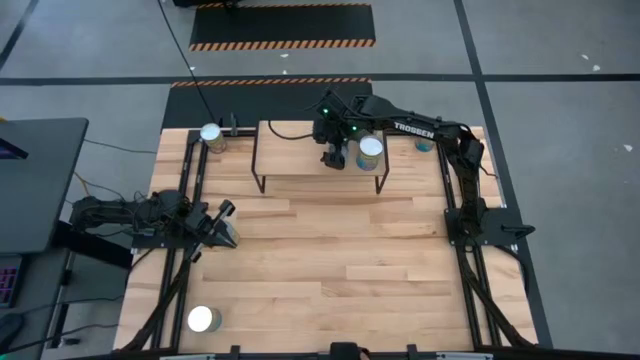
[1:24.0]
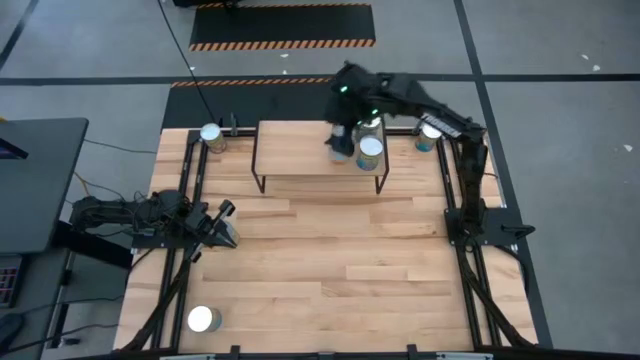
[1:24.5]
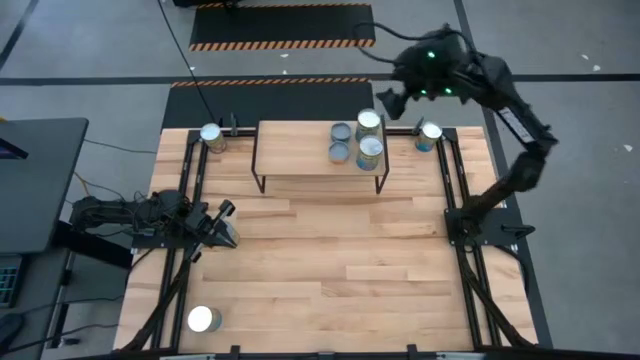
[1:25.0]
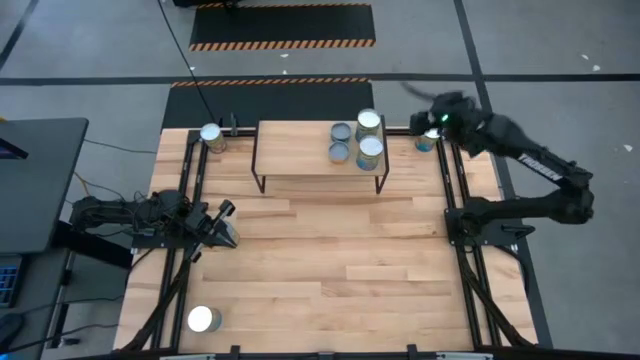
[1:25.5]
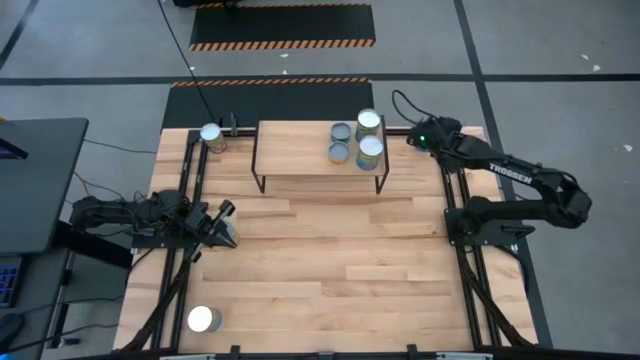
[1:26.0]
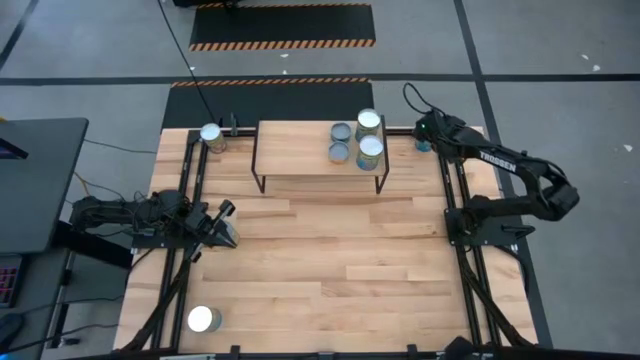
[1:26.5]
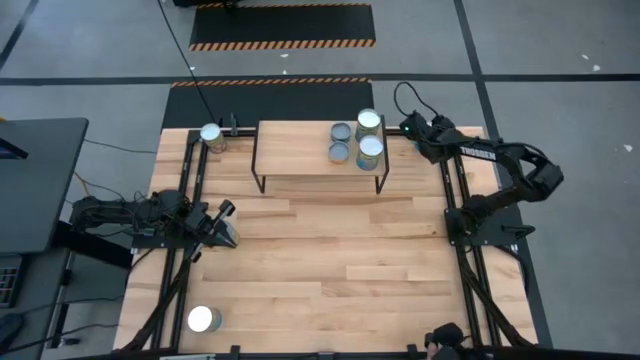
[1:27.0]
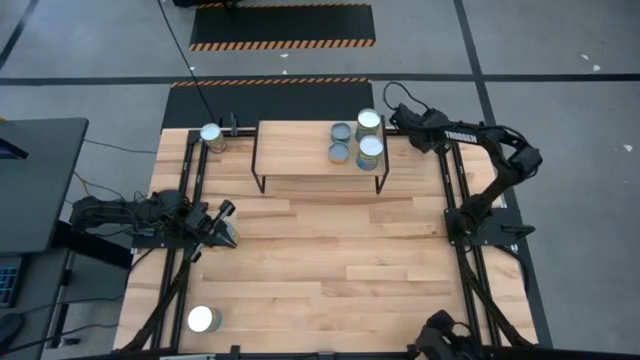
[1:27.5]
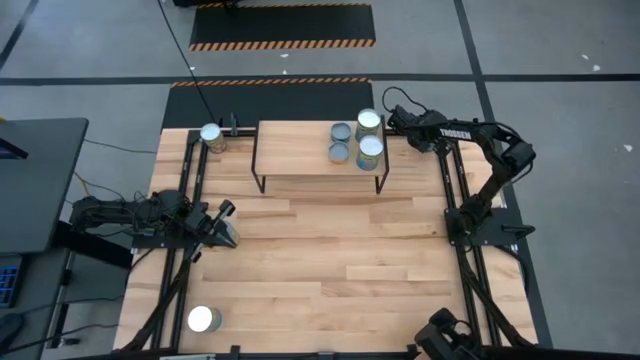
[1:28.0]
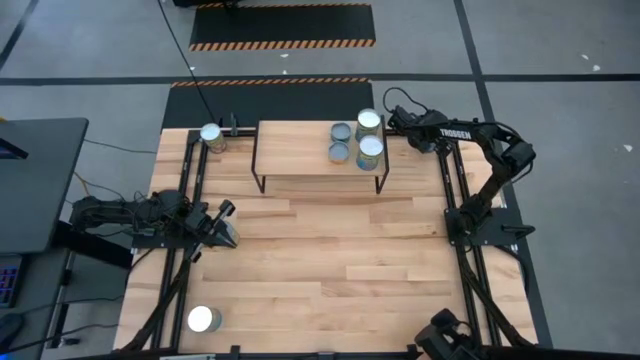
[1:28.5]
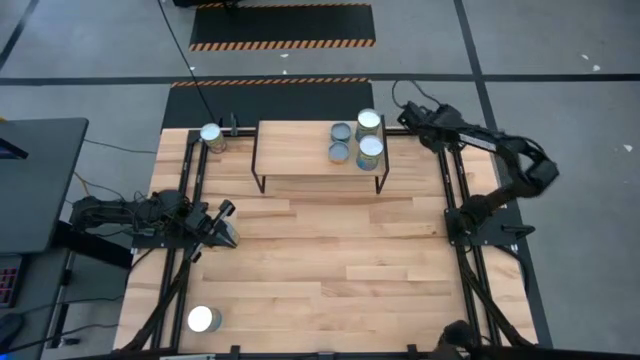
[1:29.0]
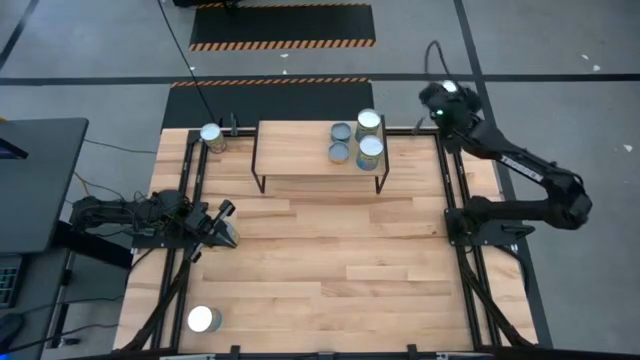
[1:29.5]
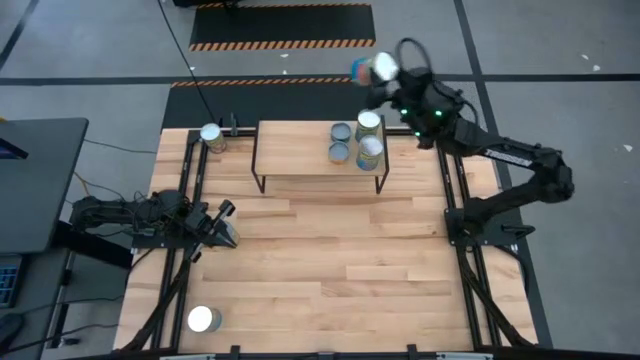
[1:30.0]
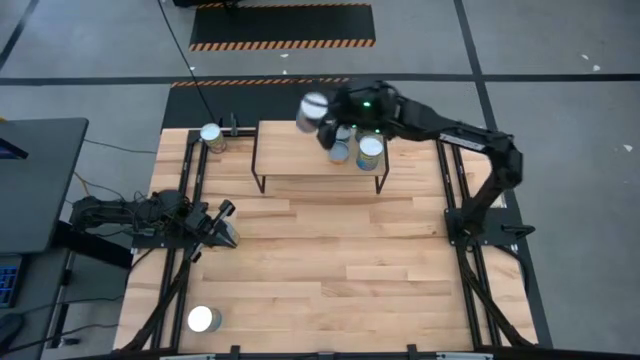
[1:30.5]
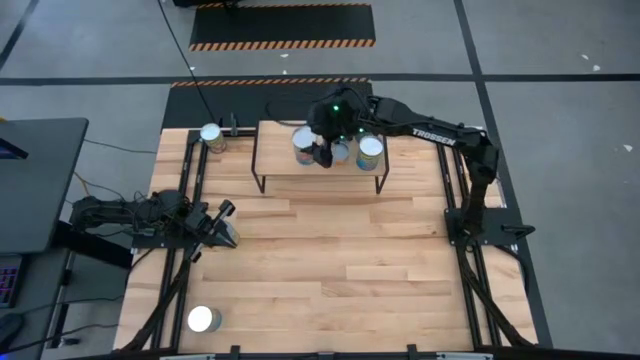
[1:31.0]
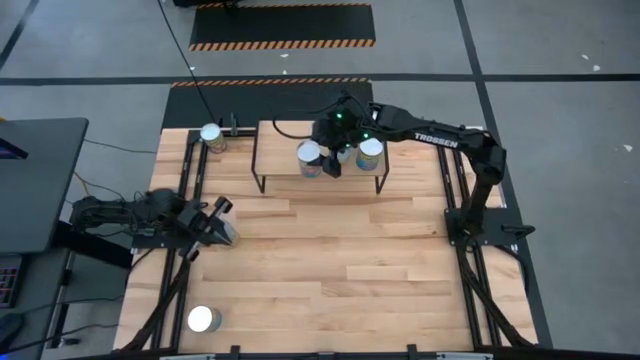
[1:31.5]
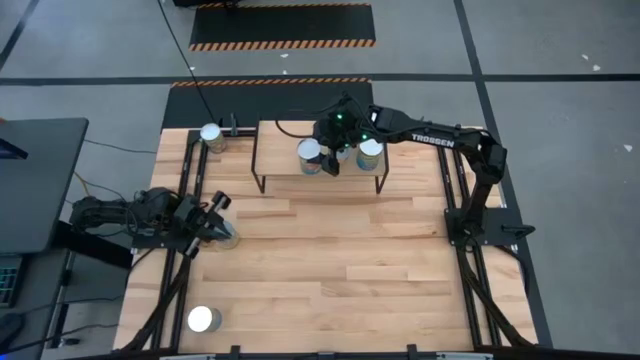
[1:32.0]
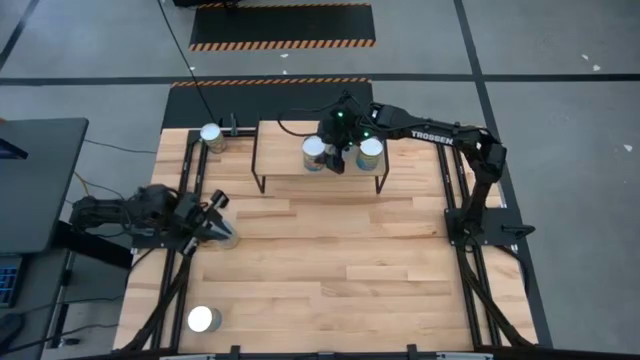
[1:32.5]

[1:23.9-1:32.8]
Task: Pick and place cans onto a shelf
Put the big blue canned tomatoes on the shelf

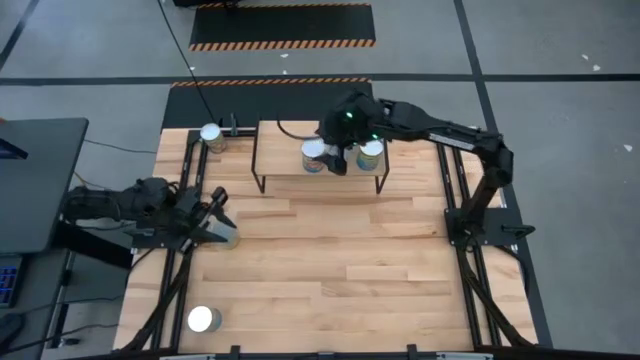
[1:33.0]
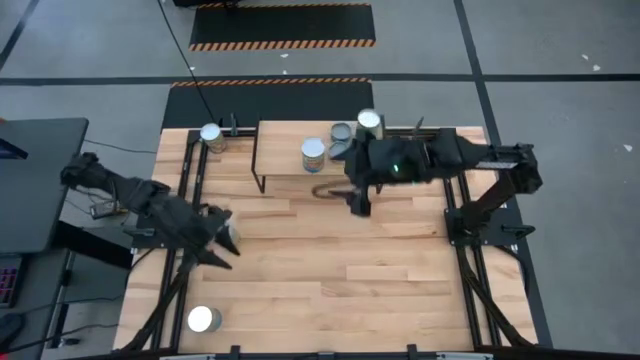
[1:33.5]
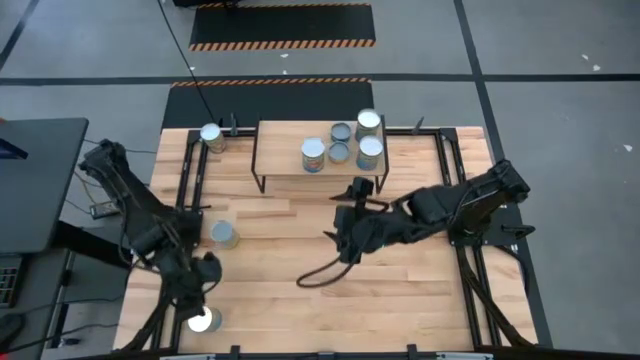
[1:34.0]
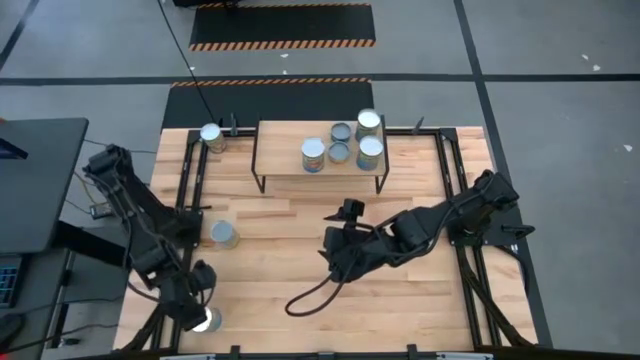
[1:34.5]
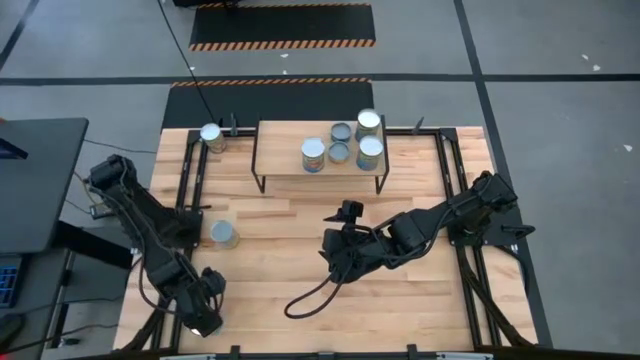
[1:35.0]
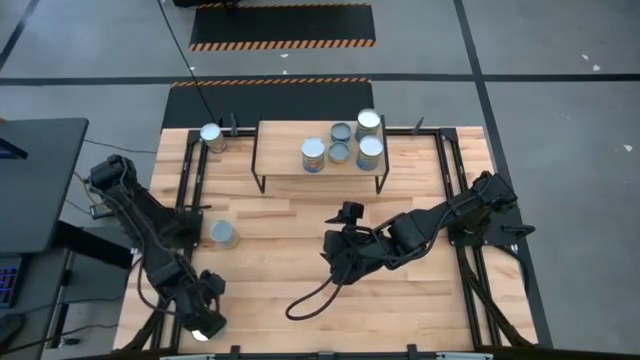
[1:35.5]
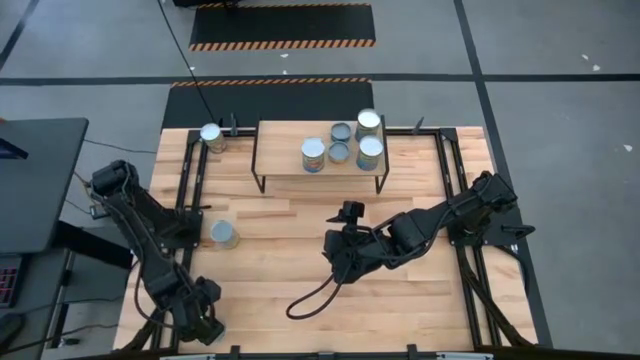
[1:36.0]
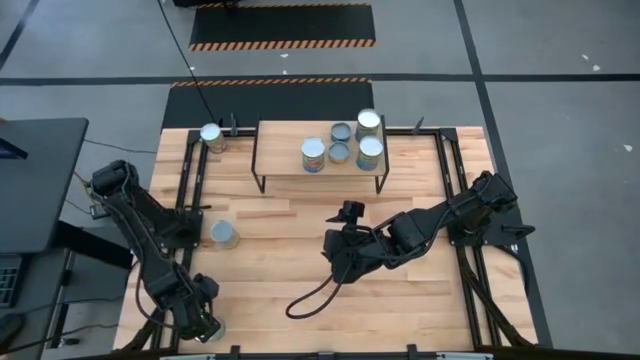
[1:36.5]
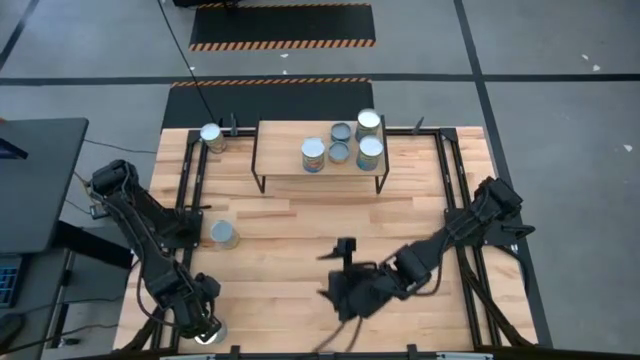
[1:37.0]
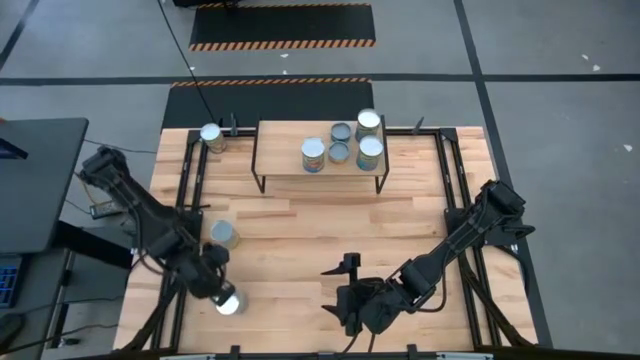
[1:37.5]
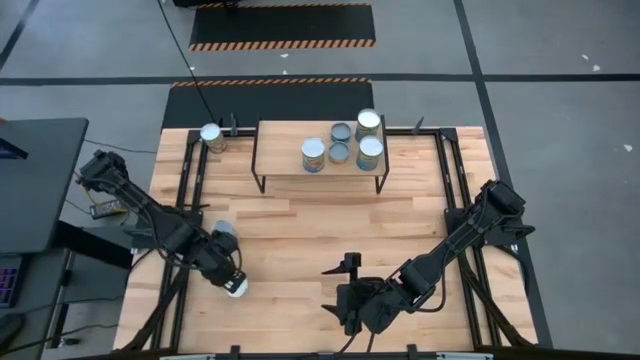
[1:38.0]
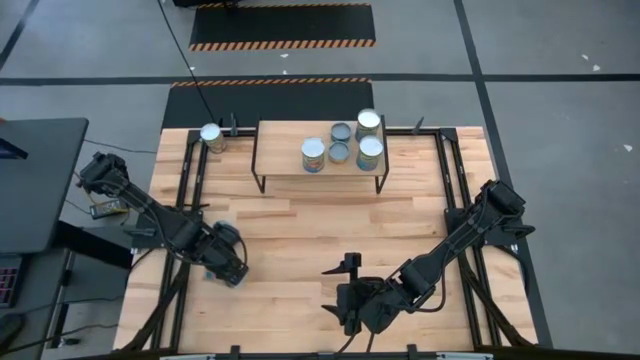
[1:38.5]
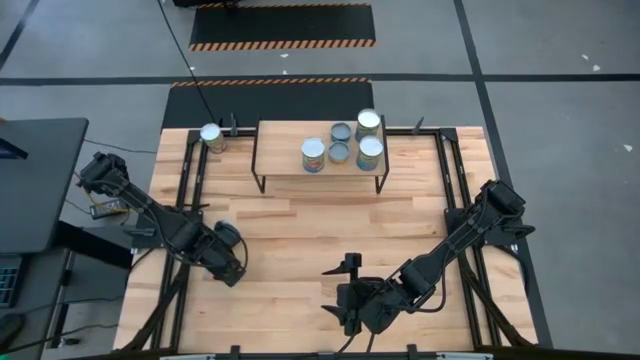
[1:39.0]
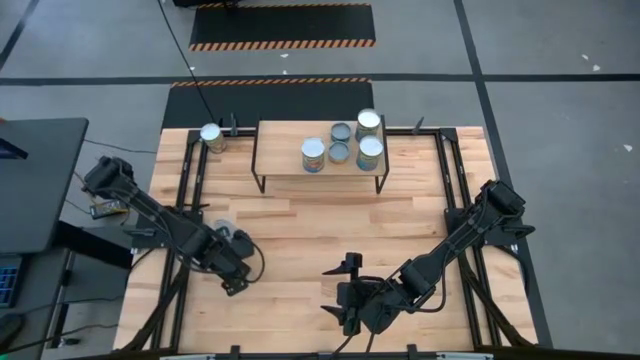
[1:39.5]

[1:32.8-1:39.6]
Put the big blue canned tomatoes on the shelf aligned with the other big blue canned tomatoes

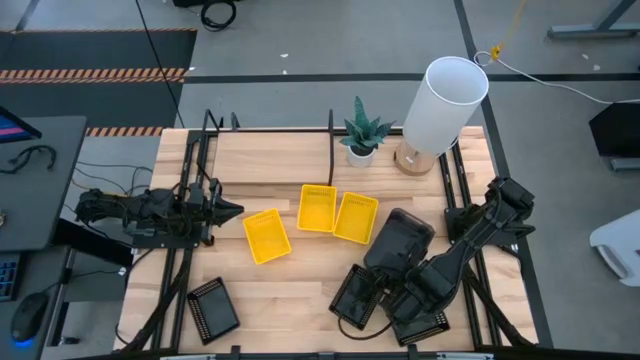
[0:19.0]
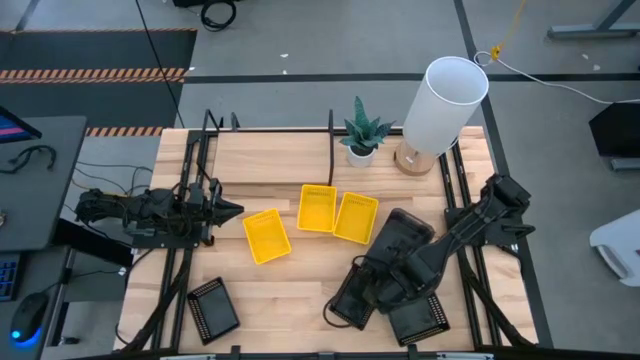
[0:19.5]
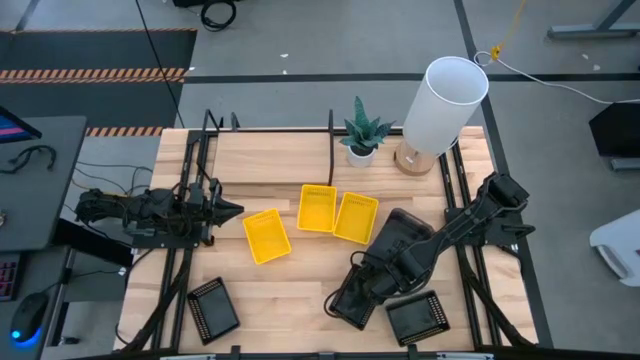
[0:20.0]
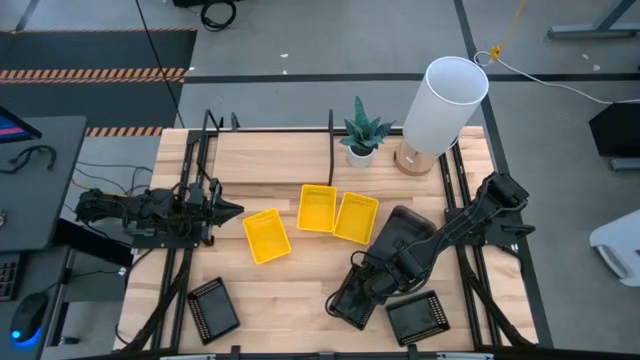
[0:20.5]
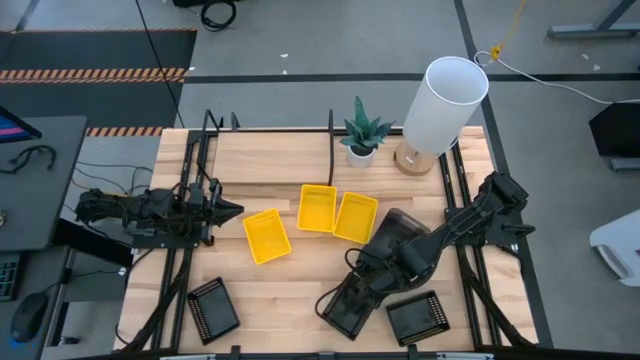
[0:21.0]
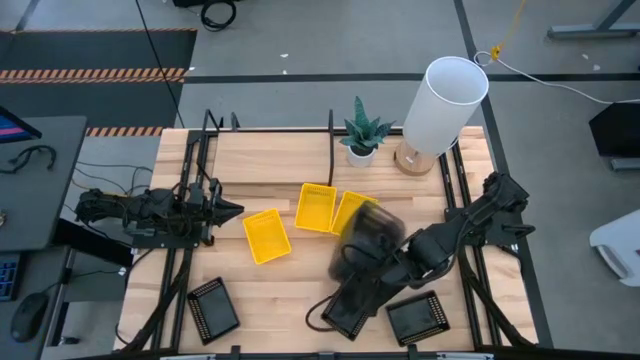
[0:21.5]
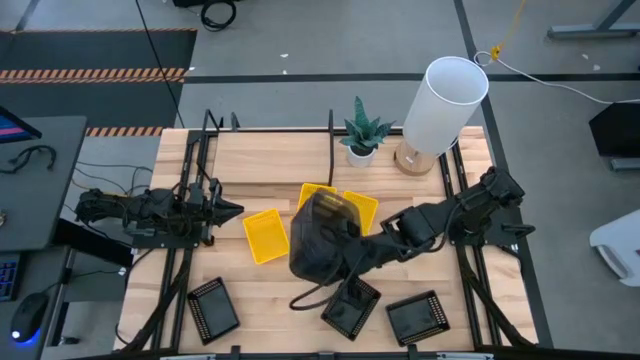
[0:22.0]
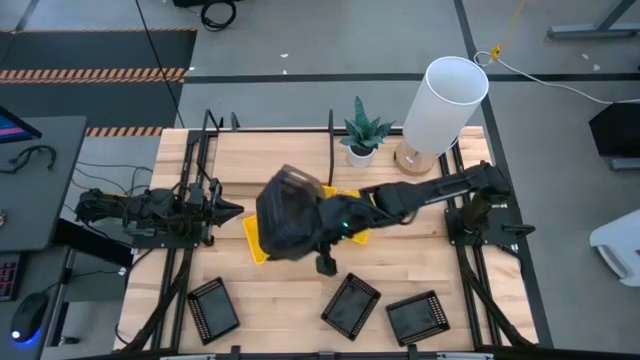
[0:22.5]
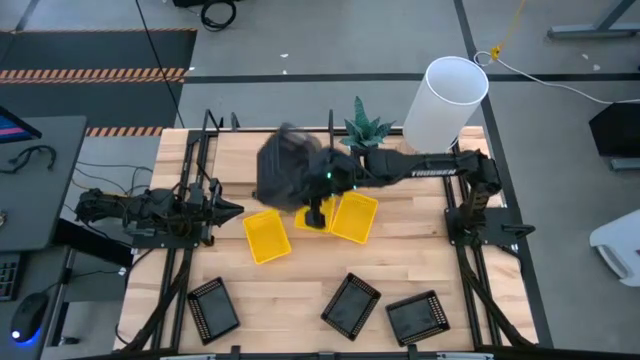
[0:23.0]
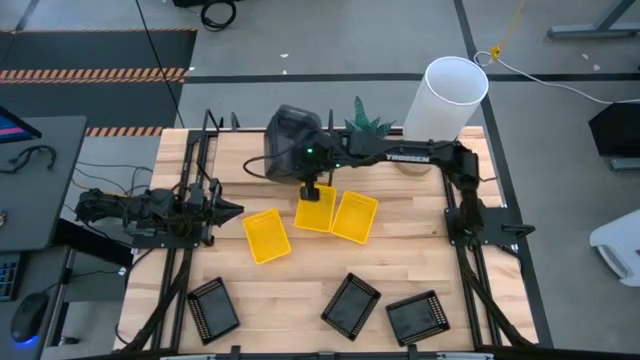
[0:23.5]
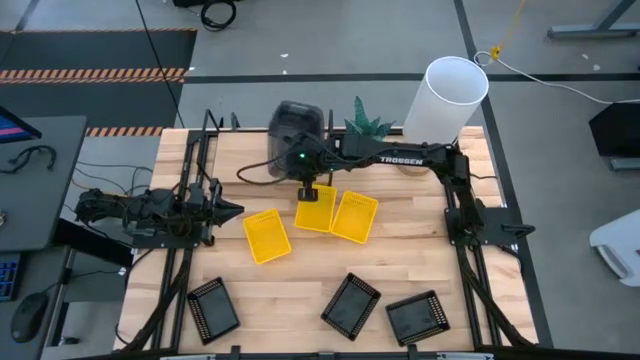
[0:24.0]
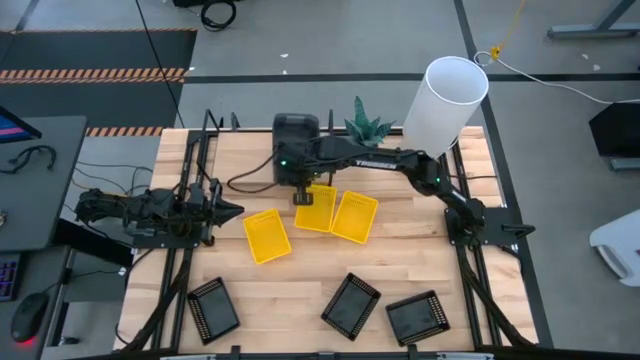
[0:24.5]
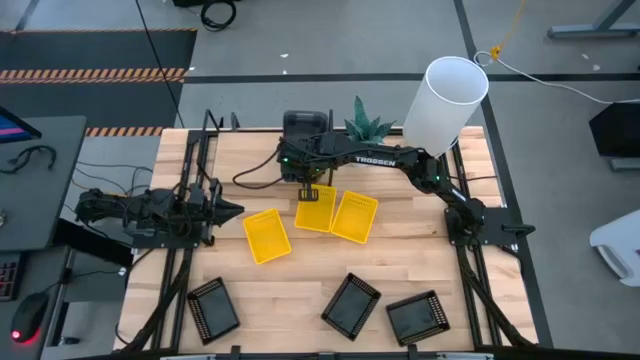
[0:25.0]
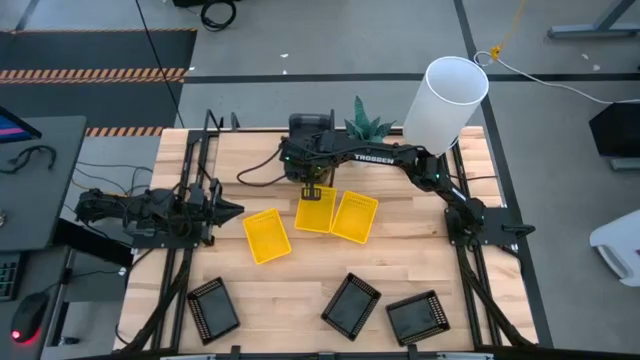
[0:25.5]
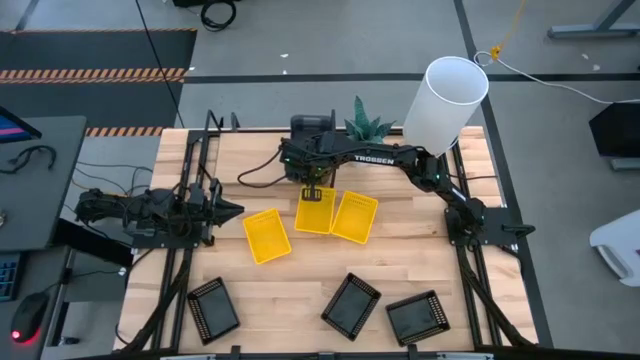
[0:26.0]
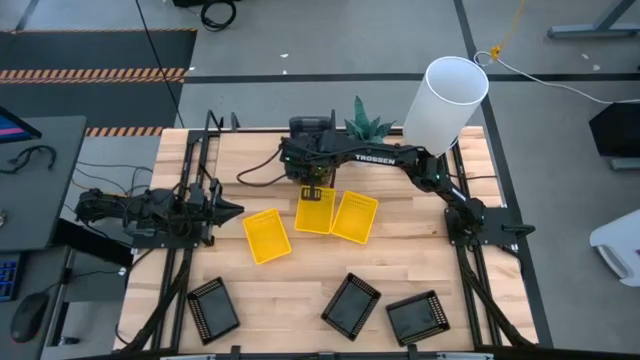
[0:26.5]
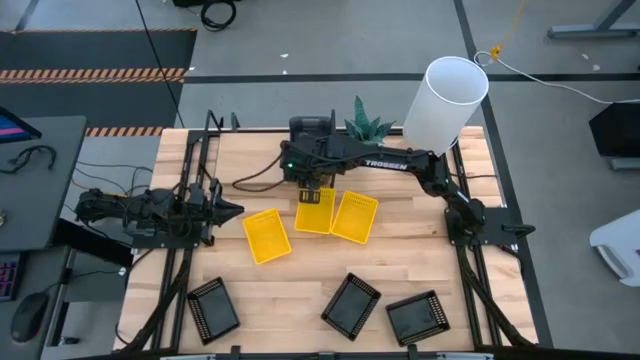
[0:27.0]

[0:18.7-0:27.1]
Task: Stack baskets on shelf by color
Put the stacked transparent black bins on the shelf
